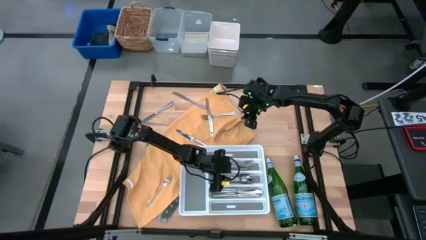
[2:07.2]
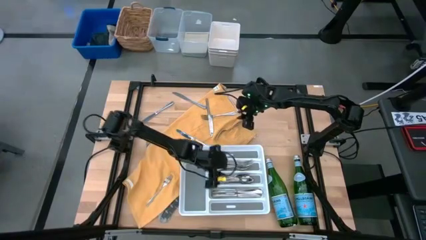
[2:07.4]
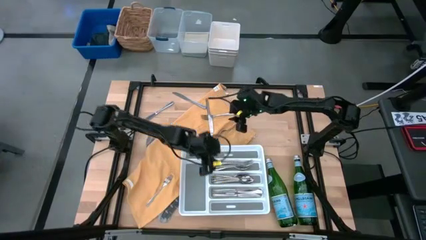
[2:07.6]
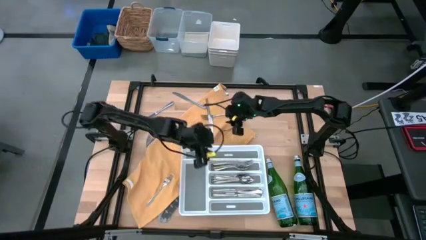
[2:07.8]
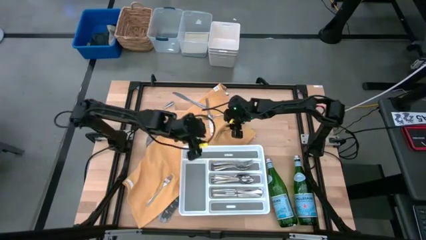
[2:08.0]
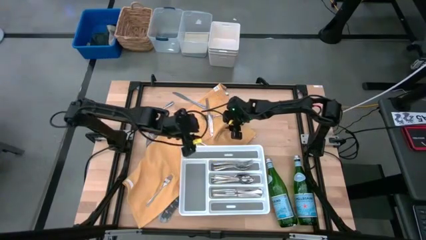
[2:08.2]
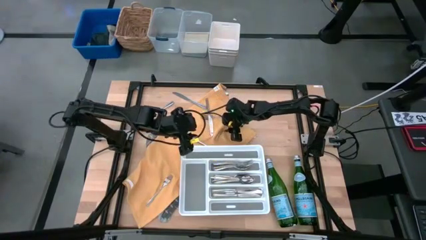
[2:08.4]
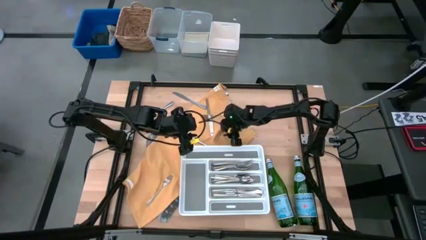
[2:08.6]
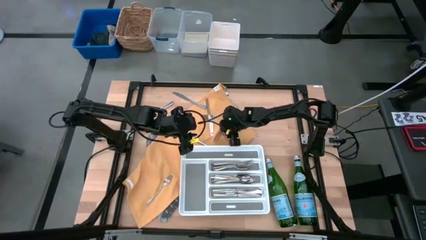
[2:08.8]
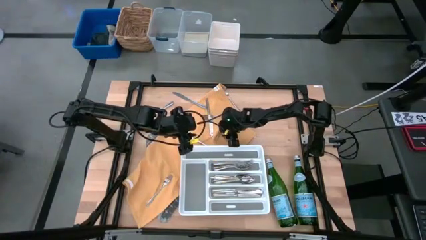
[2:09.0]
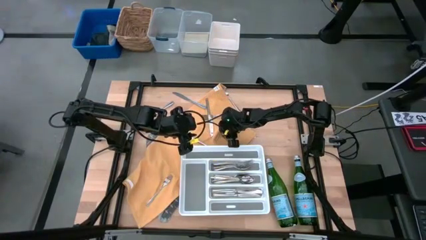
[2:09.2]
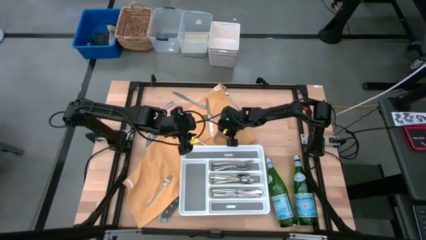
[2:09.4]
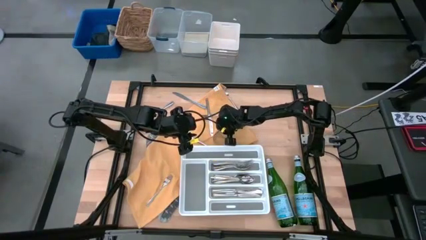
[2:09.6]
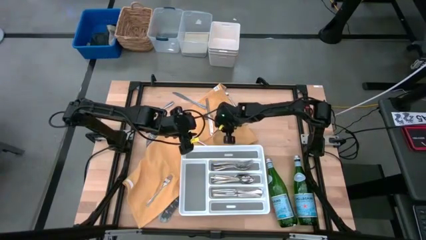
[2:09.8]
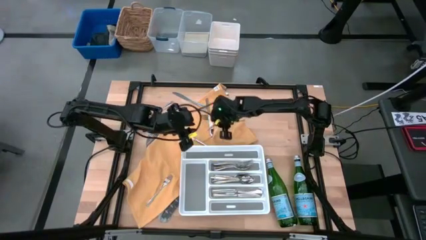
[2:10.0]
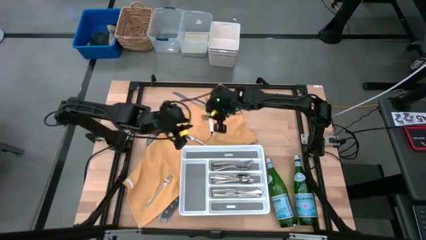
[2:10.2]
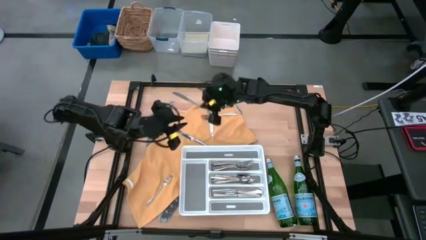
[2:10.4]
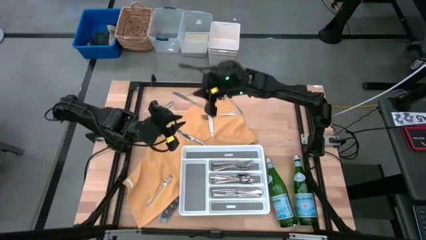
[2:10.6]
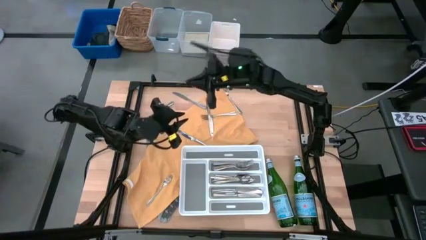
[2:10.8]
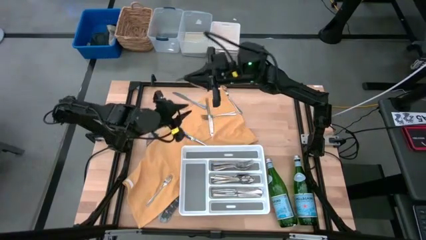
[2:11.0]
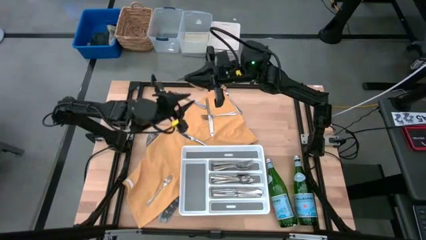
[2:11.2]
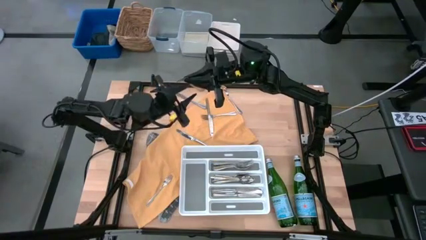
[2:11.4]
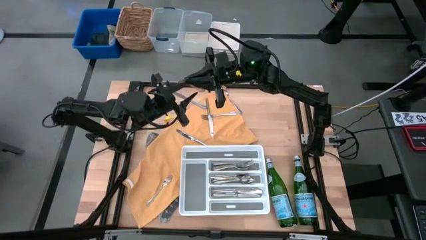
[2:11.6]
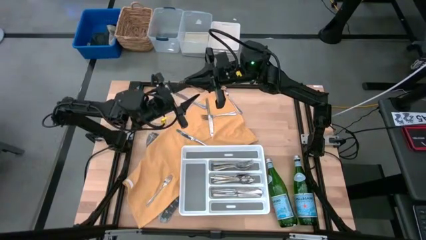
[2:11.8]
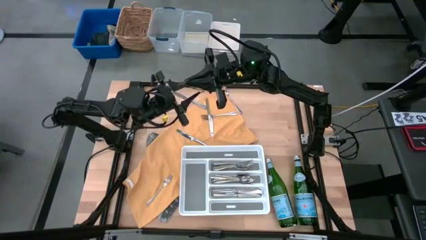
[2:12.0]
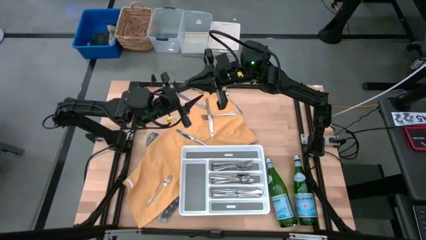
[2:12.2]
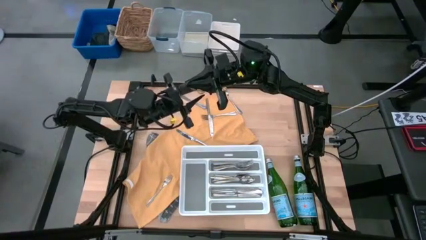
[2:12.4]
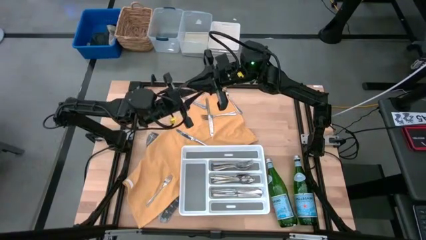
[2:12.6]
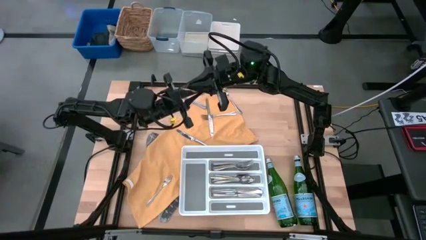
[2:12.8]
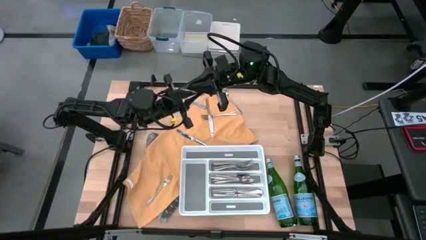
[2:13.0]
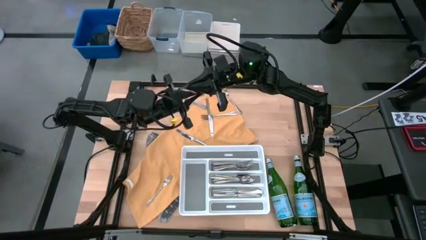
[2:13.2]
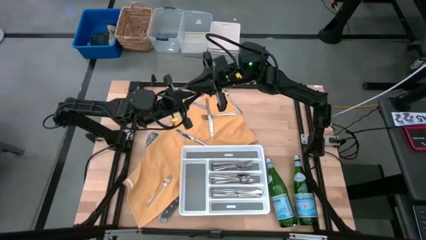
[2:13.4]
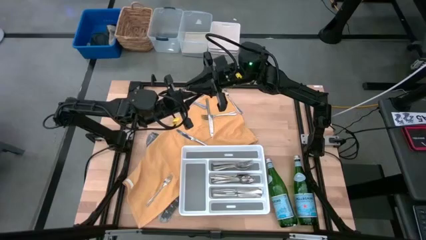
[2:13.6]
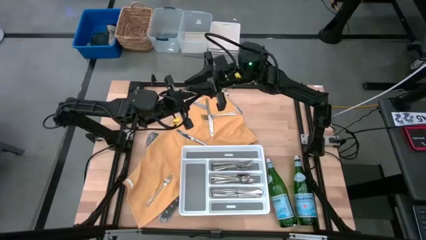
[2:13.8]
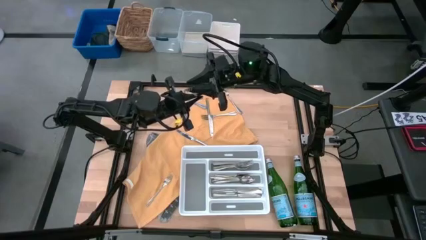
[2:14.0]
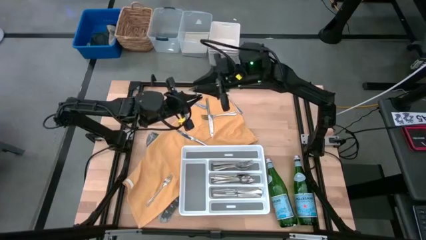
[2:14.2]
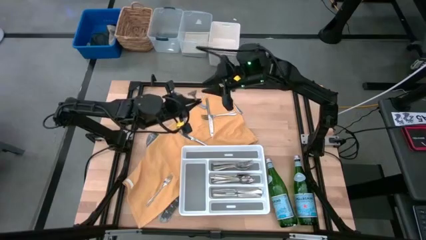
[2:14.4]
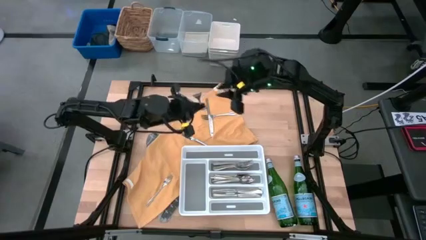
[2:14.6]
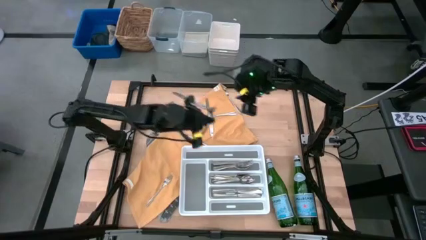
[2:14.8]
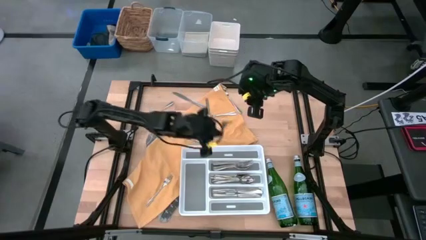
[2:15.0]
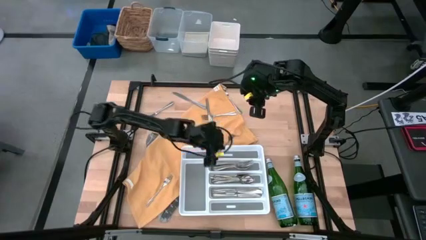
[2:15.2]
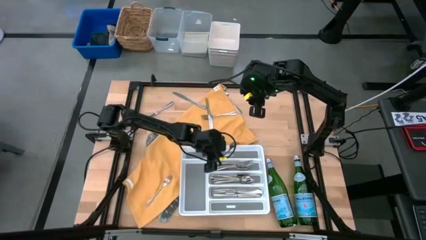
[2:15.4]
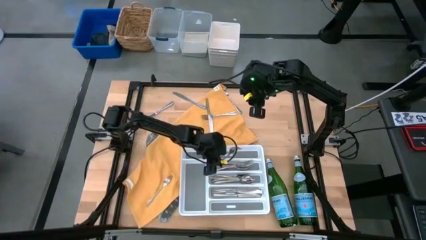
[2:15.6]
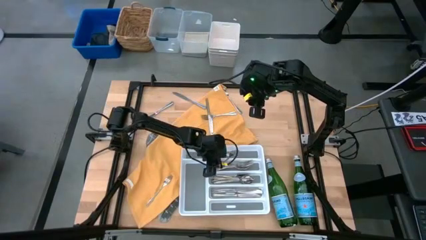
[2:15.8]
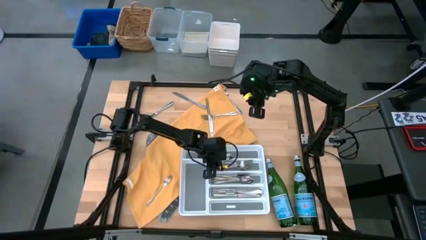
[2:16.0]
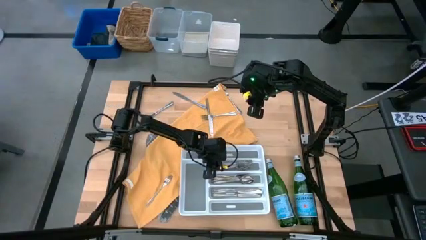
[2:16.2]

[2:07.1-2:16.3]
Task: Sort silverware
Put the silver fork into the white silverware tray

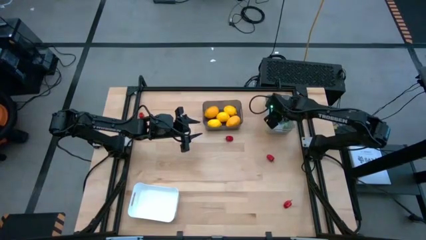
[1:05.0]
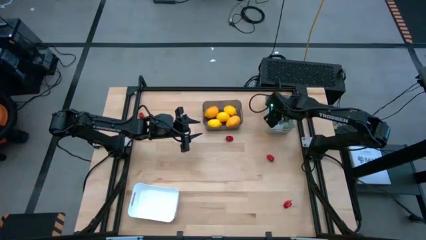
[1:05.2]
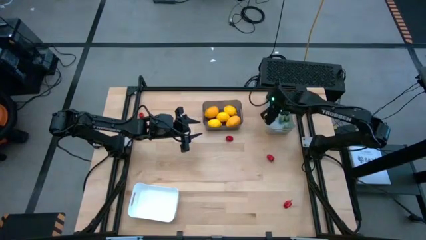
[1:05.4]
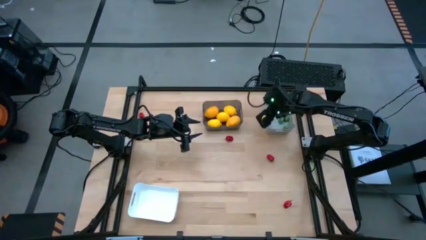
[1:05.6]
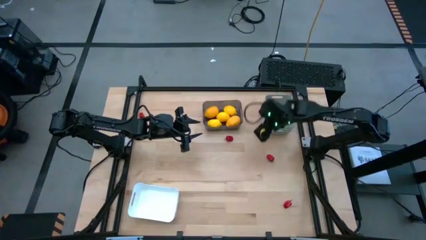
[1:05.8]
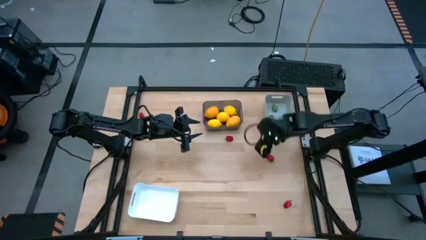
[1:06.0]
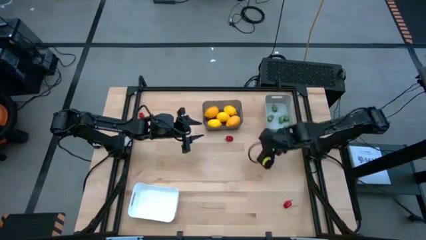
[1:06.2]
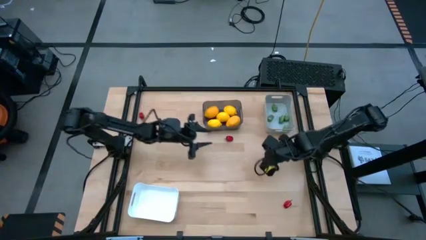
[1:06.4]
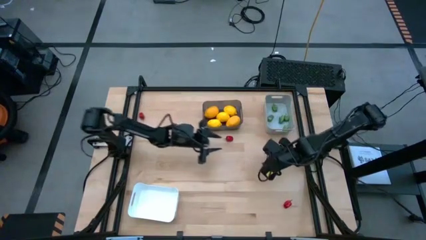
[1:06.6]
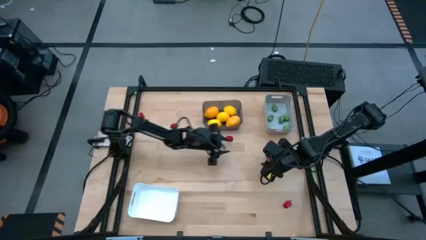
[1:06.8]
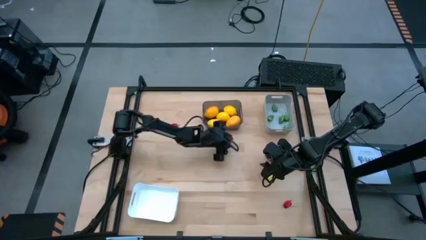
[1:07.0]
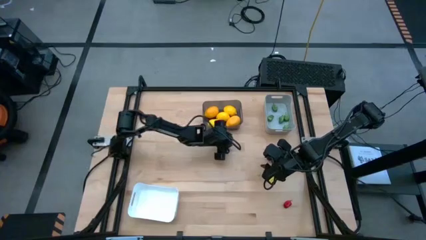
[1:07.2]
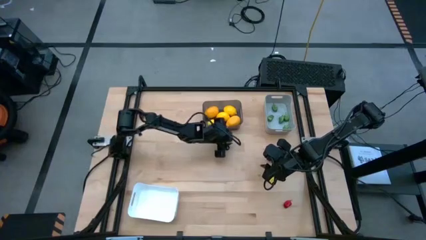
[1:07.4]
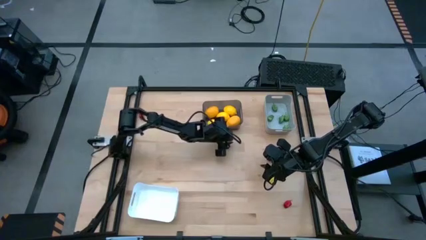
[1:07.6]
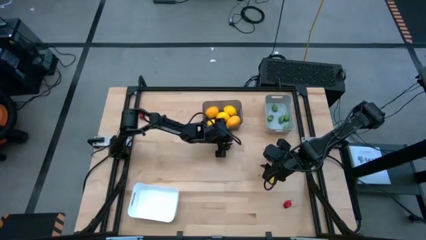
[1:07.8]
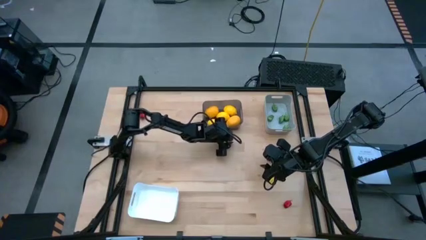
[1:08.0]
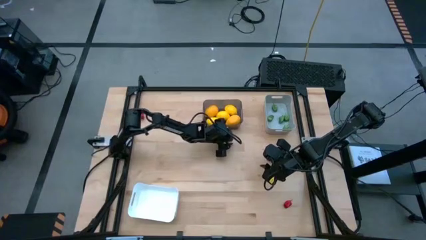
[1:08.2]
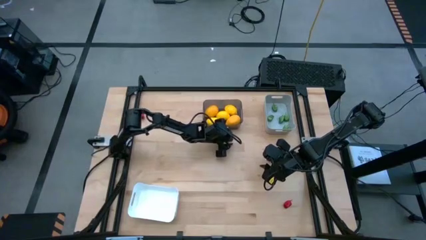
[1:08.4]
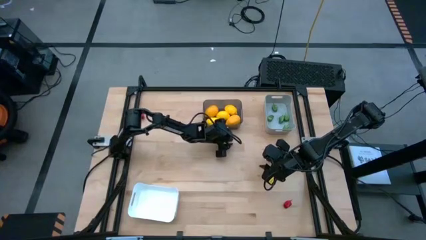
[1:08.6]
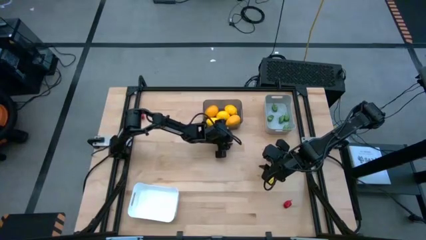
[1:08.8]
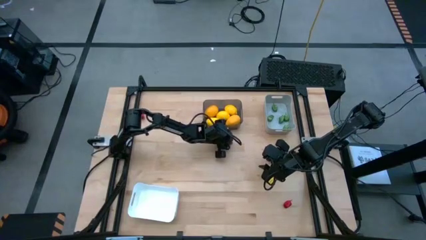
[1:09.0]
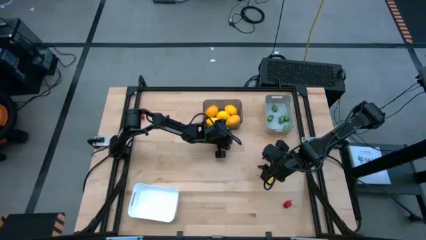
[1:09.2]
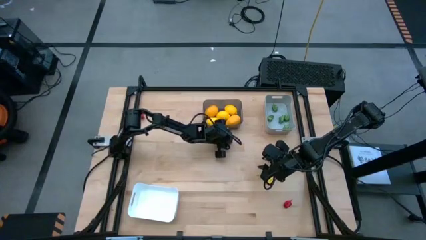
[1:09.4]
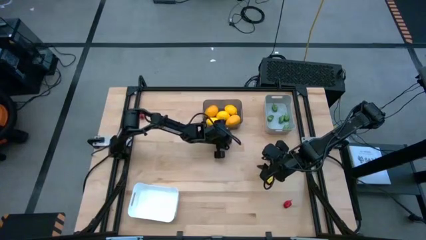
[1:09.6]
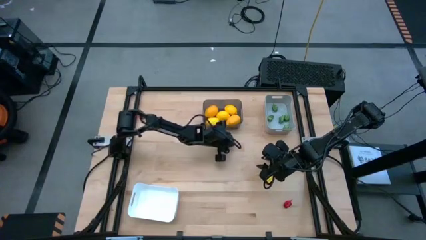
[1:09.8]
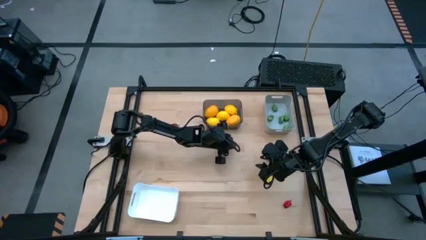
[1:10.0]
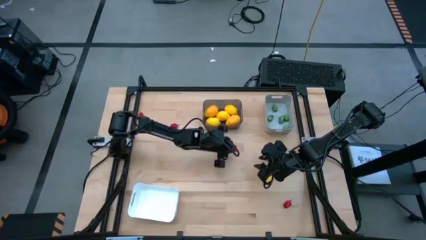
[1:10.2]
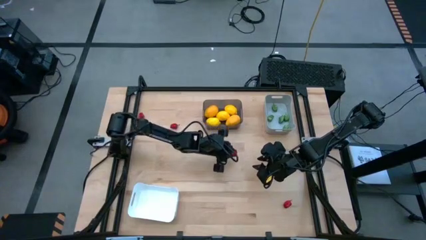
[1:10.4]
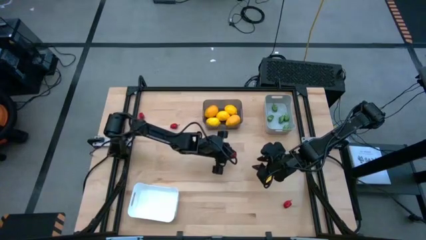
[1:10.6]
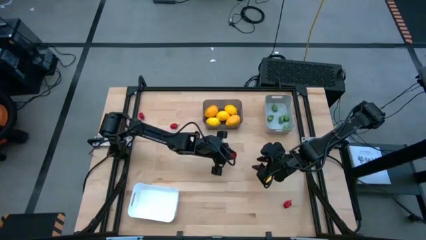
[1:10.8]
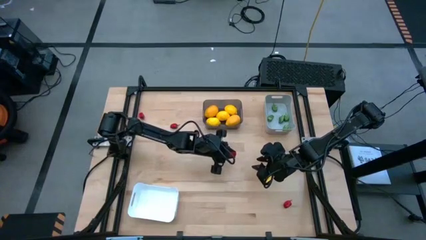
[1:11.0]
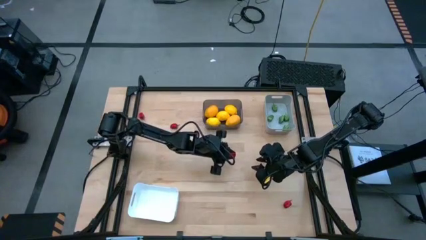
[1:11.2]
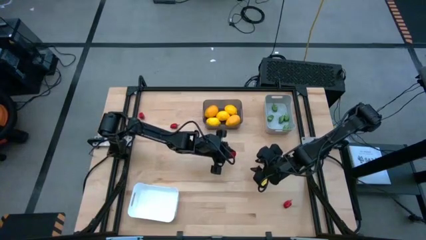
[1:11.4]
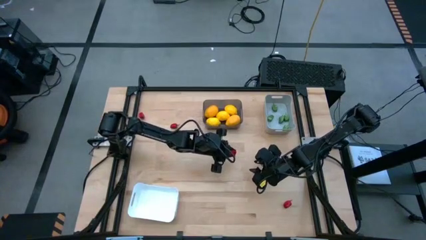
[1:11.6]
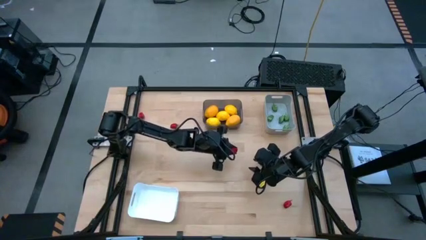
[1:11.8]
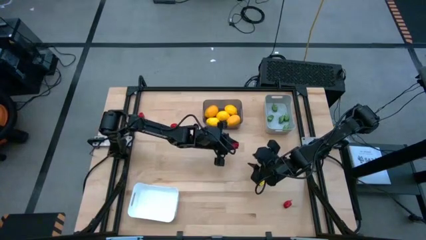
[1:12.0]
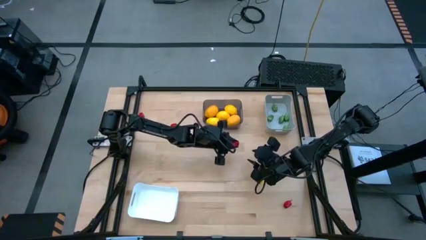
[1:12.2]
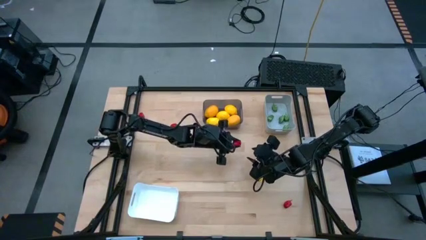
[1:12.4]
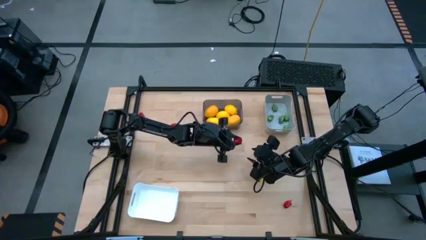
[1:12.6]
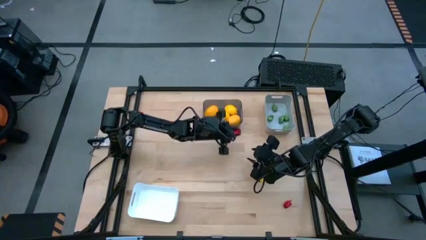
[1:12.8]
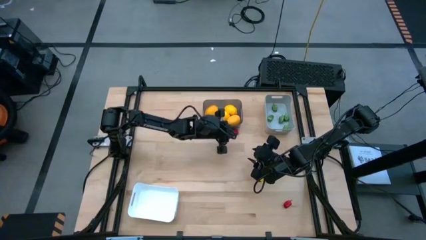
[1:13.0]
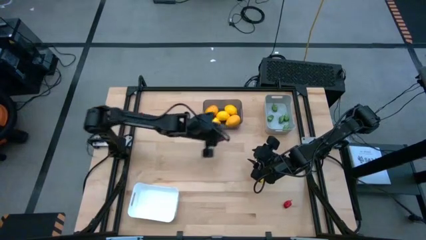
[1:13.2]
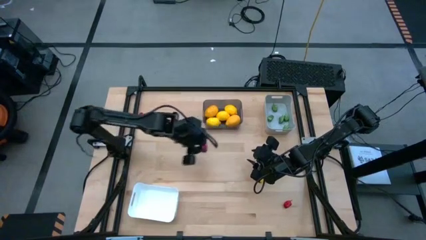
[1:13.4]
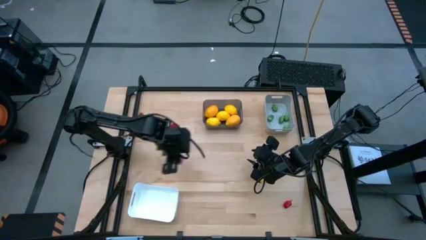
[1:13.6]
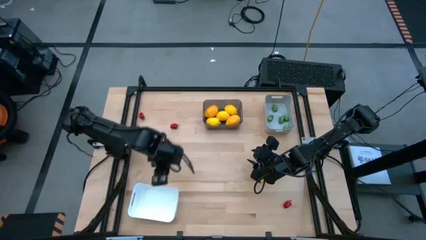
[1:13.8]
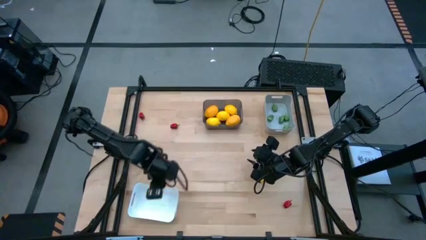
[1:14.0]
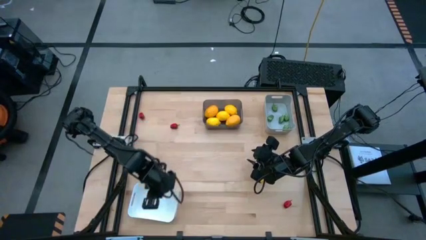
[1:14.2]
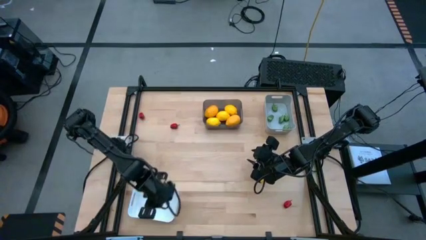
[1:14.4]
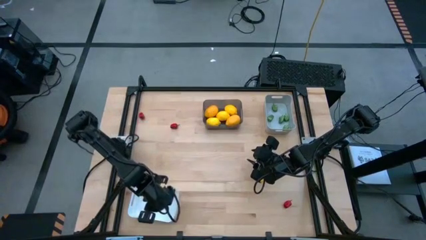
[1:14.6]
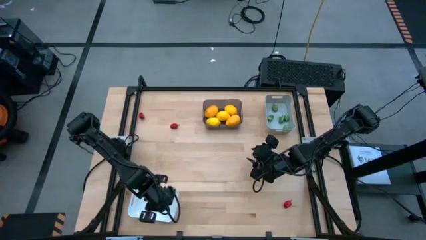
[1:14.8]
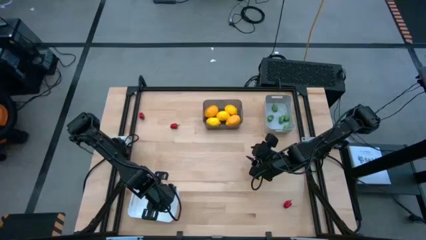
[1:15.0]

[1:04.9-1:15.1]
Task: Sort produce into baskets
Put the red pepper into the white bin
